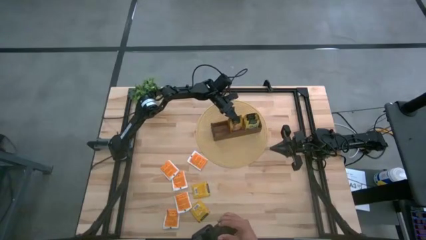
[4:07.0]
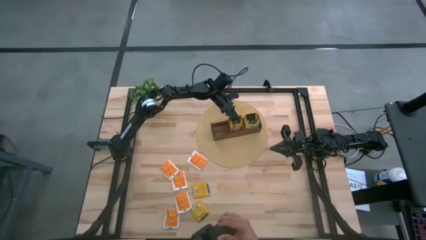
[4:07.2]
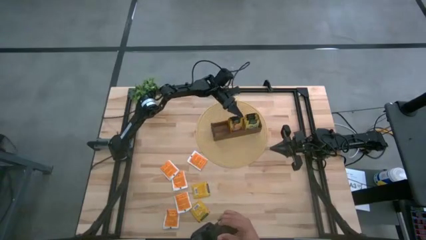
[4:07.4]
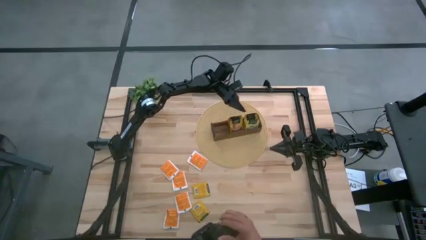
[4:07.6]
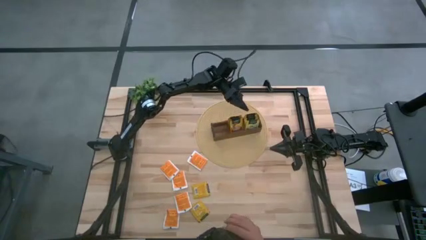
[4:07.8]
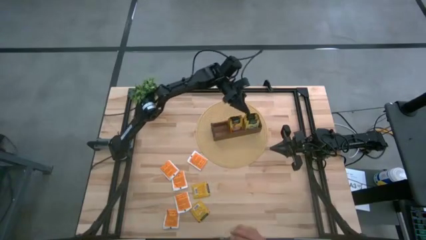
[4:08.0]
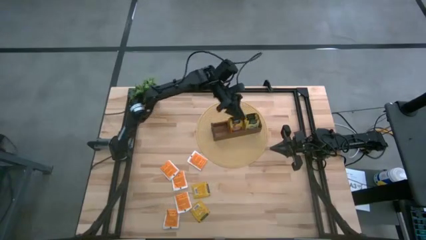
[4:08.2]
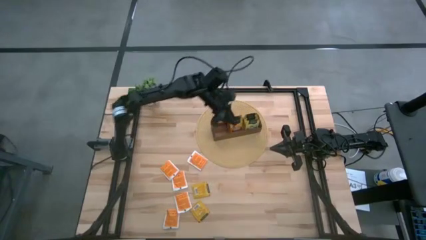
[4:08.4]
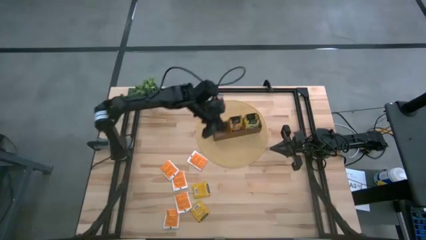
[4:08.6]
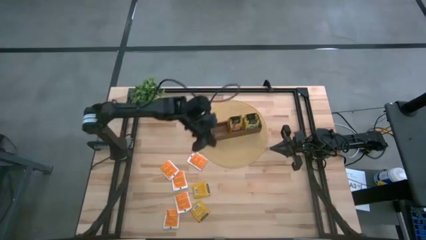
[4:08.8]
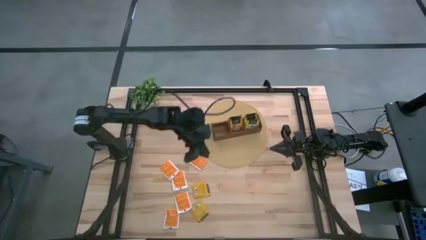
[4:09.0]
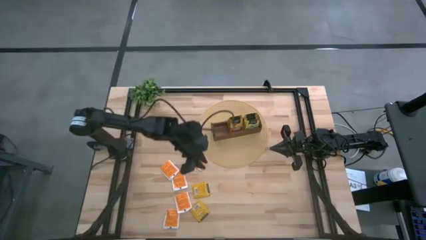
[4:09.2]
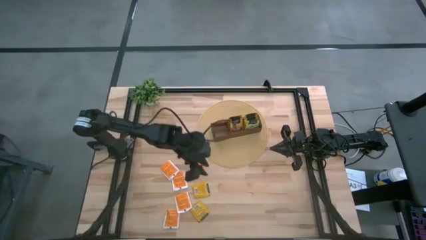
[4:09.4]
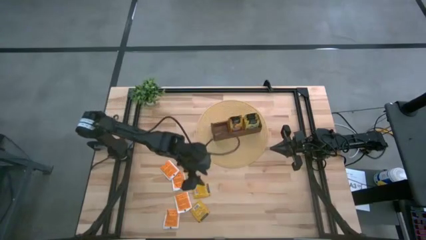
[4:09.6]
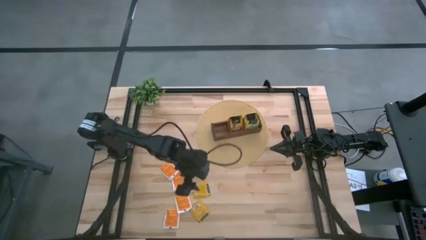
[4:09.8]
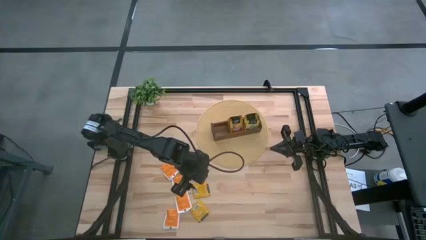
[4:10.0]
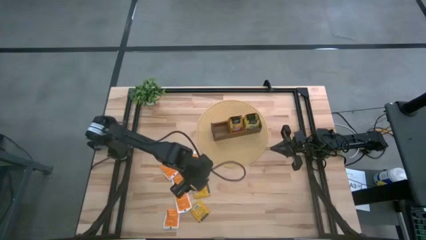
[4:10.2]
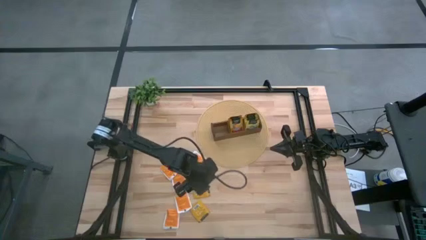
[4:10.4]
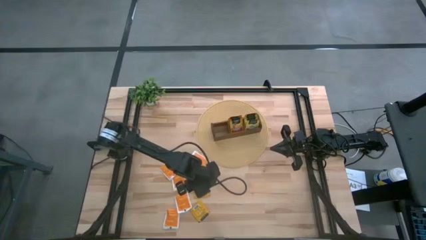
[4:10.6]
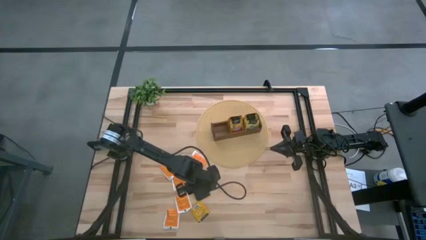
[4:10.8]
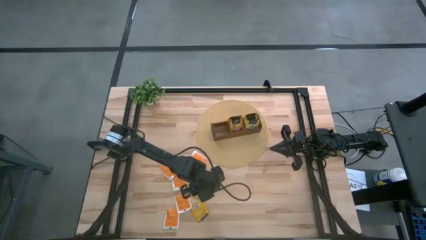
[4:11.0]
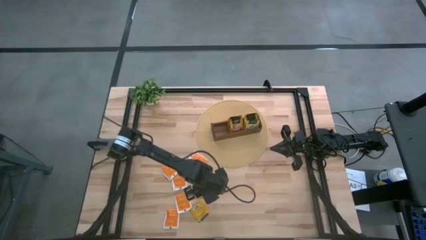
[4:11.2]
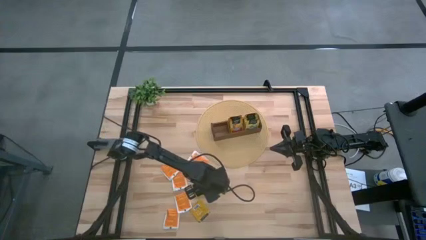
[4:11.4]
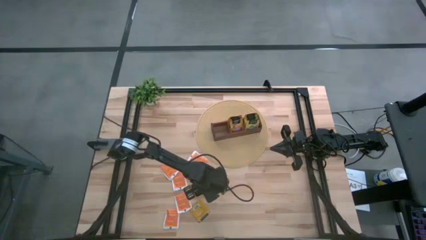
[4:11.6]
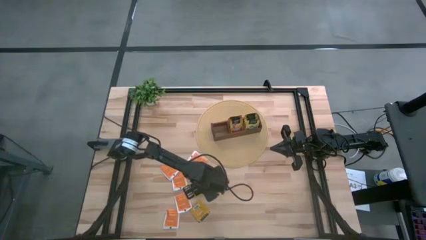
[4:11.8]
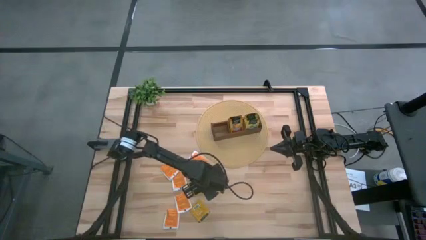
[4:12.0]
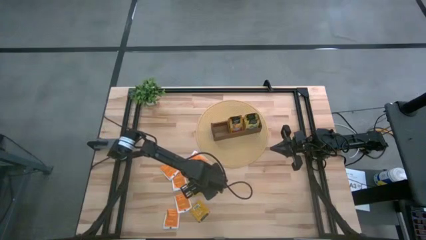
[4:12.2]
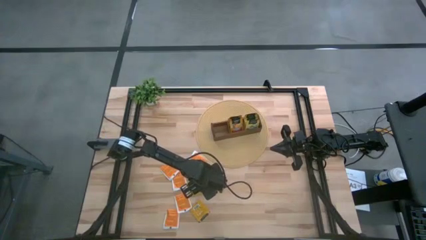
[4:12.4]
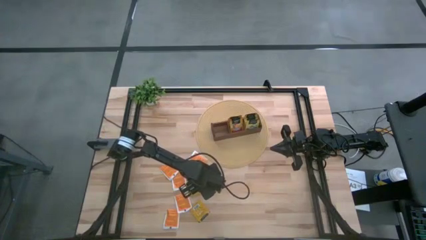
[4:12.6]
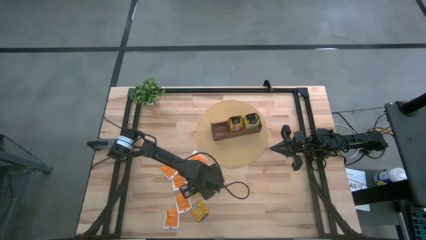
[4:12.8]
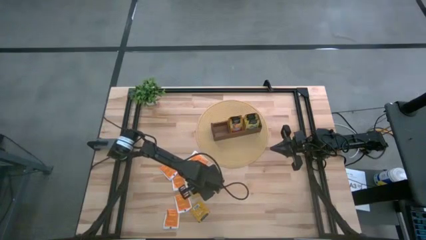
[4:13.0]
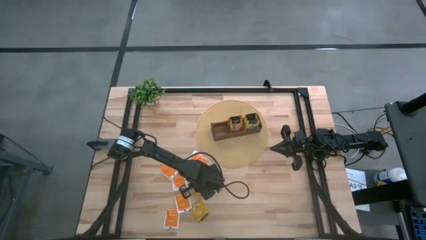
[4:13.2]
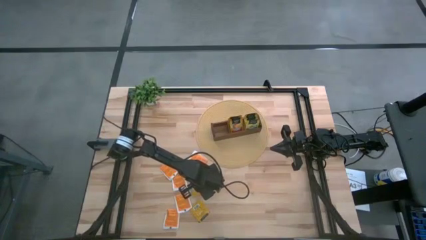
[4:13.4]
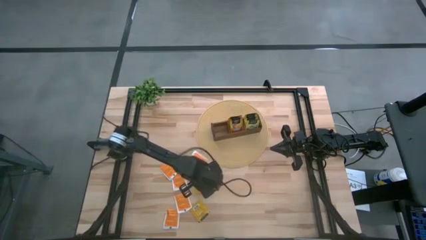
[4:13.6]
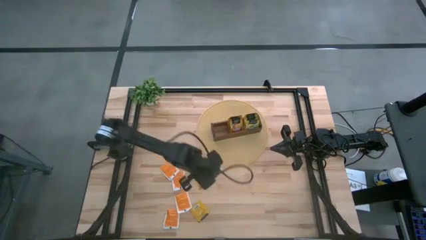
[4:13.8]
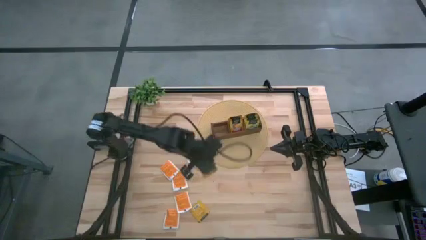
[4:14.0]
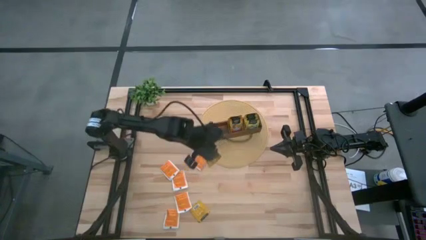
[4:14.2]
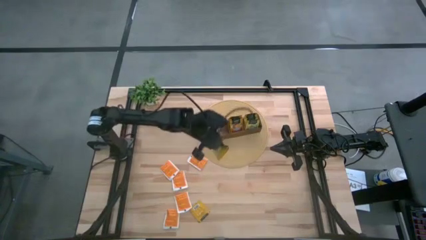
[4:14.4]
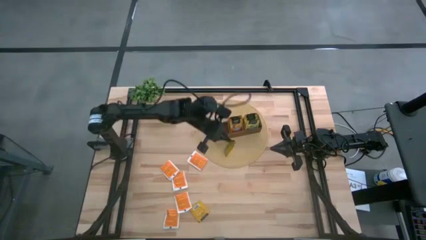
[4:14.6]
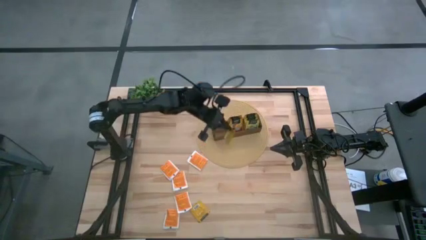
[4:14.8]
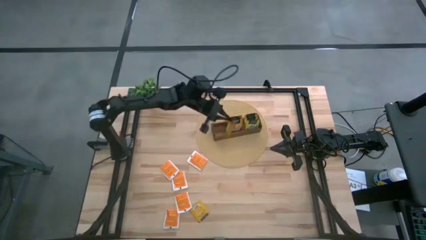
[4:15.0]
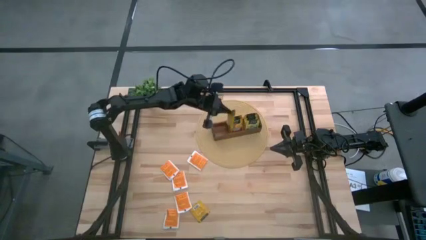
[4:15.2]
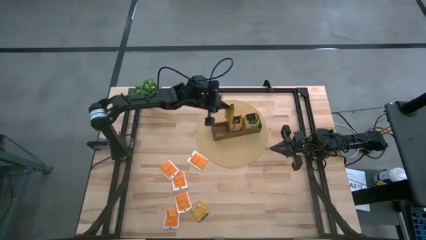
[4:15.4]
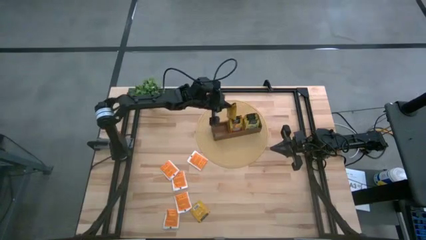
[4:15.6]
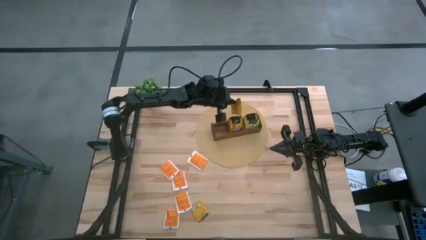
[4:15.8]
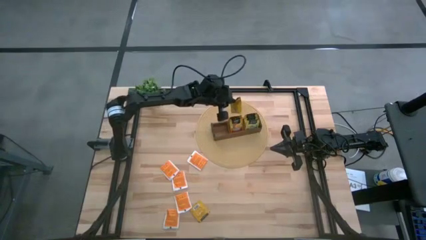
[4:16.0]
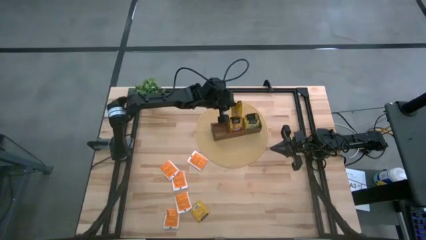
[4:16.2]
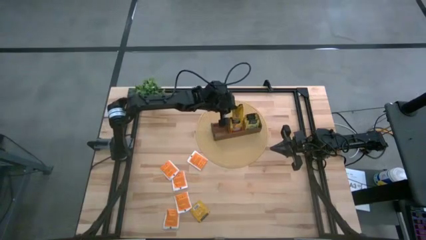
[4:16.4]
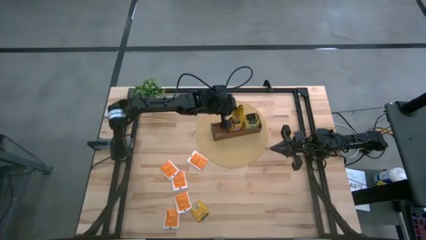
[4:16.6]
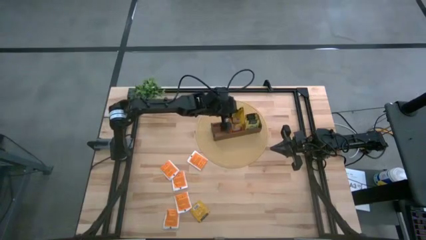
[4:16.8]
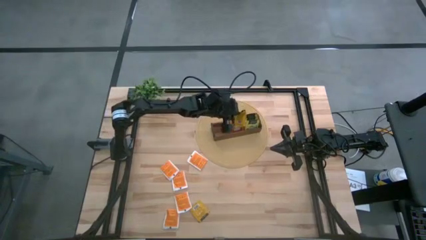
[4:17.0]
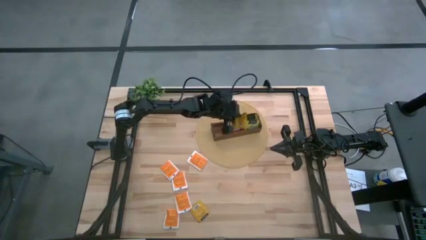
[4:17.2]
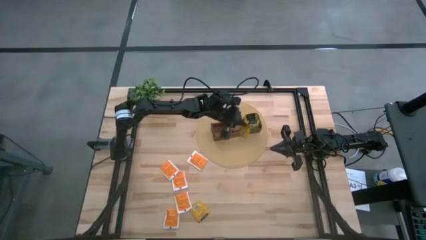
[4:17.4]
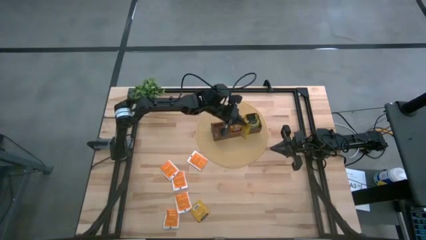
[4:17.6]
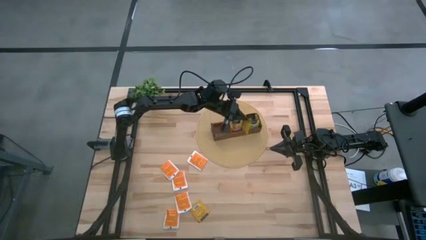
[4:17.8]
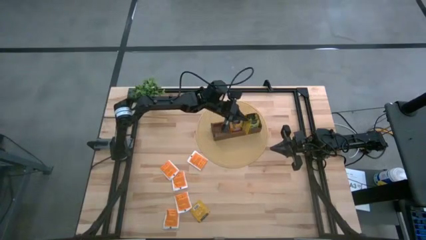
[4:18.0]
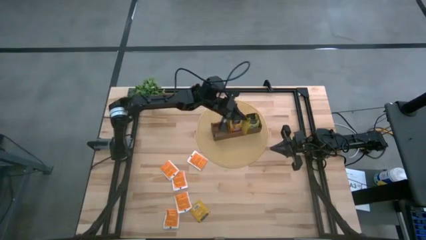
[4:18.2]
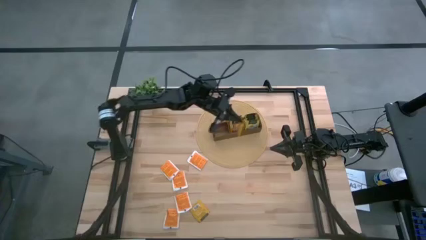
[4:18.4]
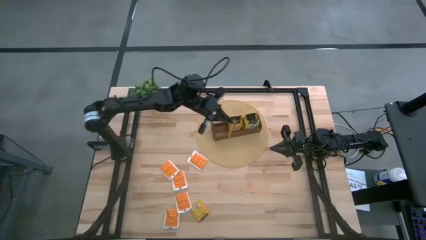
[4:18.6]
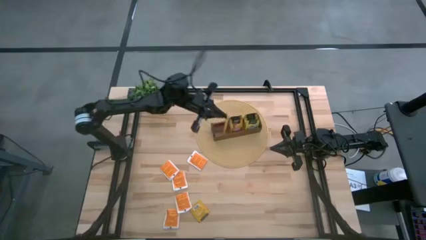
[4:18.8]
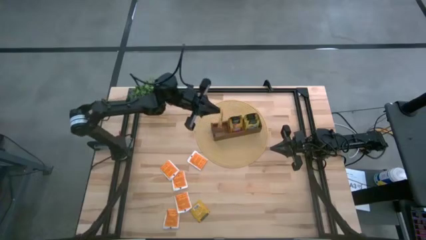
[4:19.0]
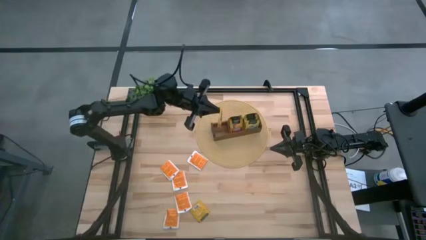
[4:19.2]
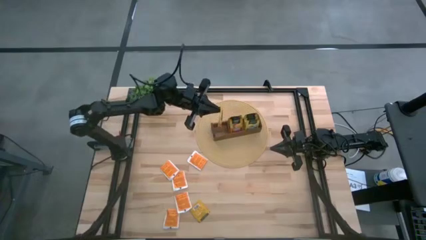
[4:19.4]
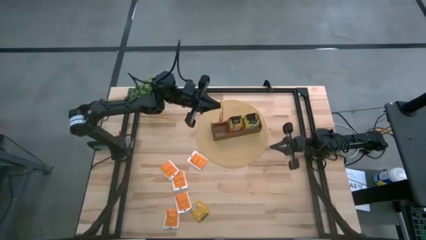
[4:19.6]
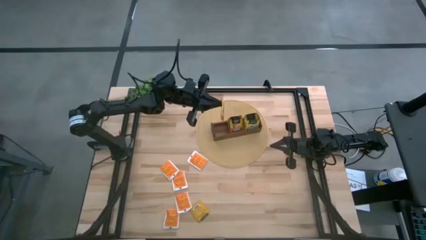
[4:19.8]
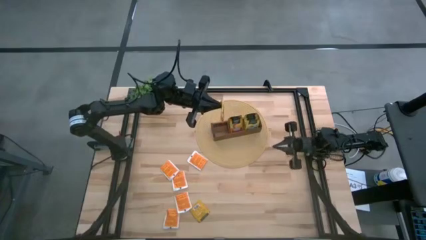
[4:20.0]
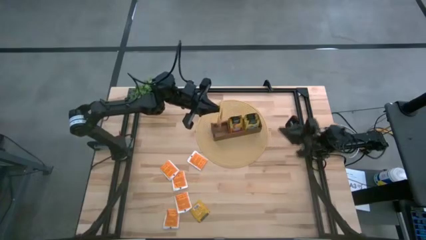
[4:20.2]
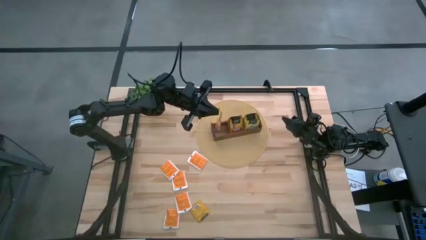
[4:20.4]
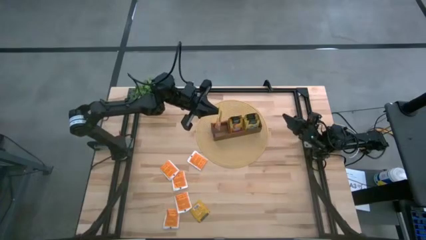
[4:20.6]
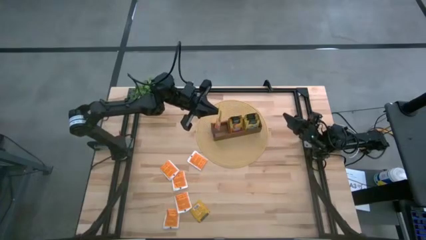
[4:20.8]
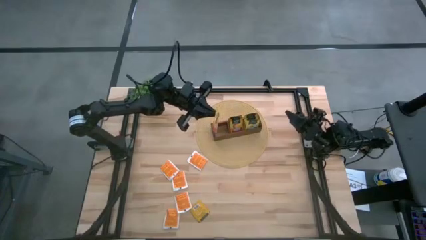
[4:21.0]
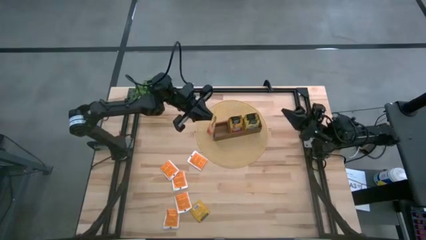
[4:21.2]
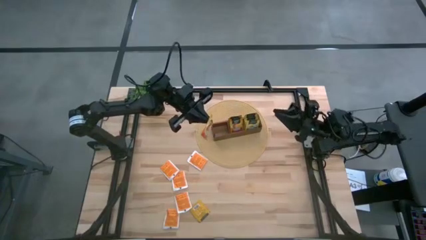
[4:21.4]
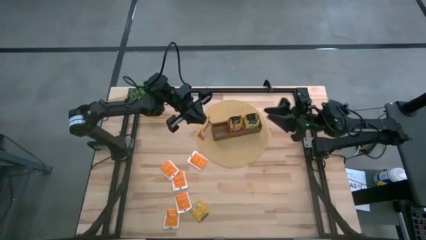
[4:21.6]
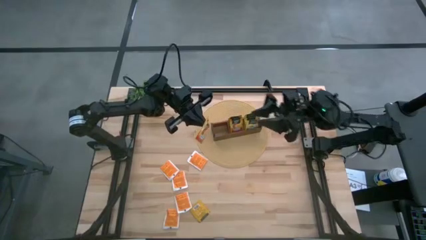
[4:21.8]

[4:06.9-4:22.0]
Task: Pick & Place Tea
Put the top orange tea bag into the middle section of the wooden organizer
